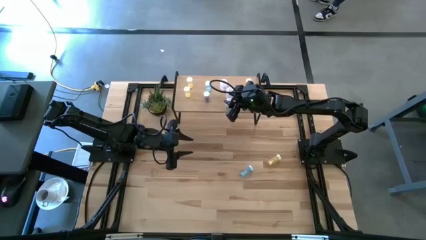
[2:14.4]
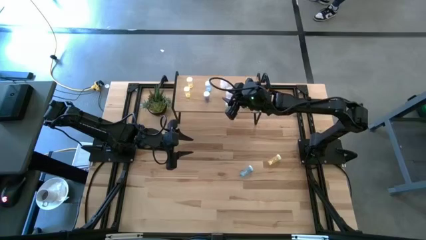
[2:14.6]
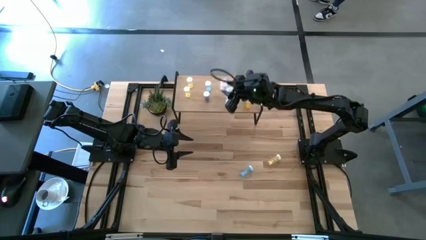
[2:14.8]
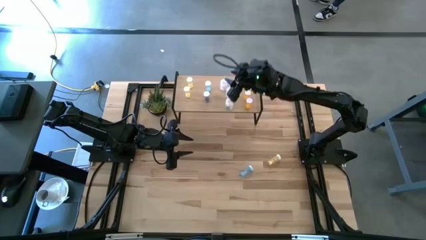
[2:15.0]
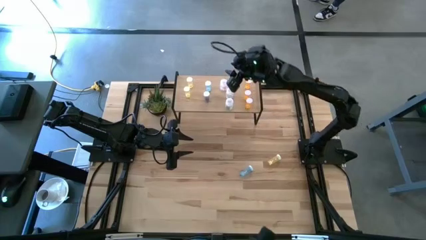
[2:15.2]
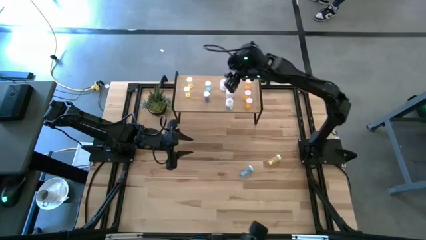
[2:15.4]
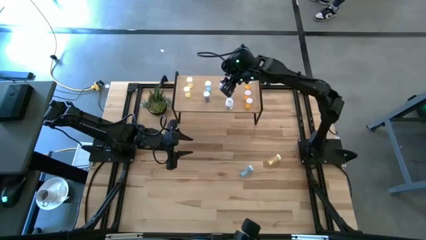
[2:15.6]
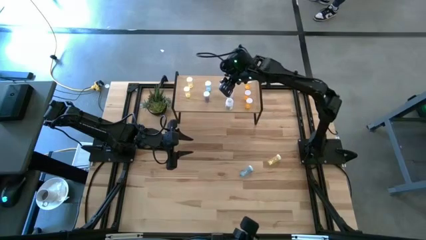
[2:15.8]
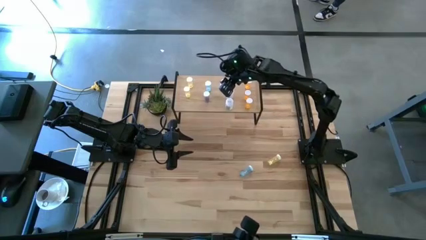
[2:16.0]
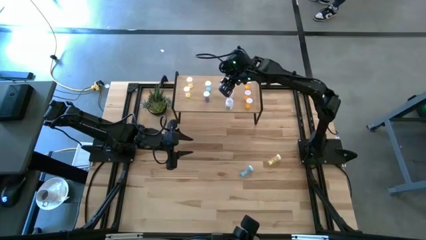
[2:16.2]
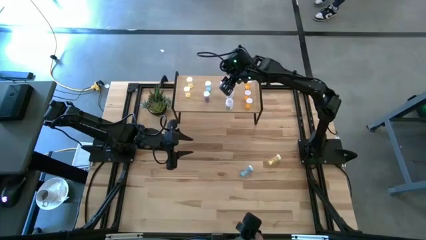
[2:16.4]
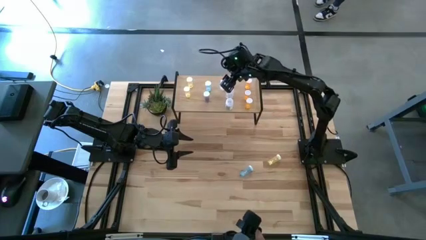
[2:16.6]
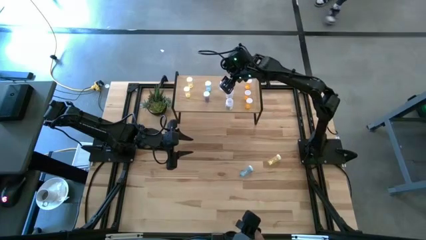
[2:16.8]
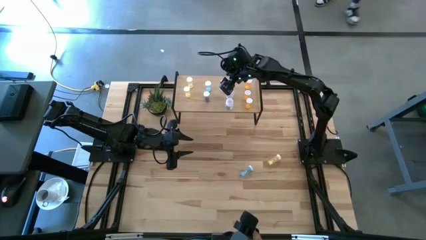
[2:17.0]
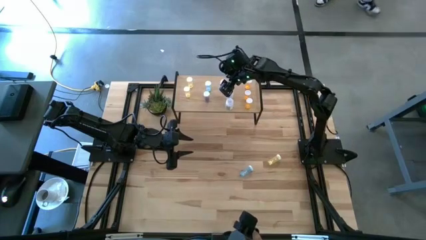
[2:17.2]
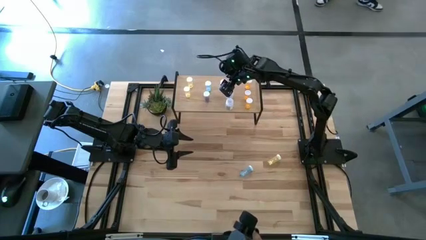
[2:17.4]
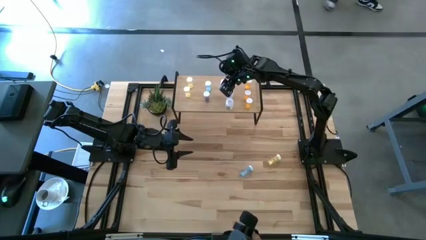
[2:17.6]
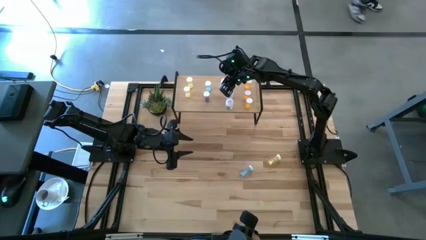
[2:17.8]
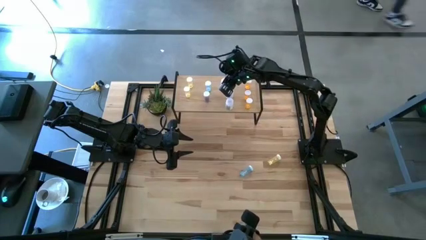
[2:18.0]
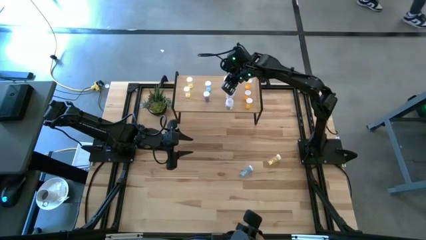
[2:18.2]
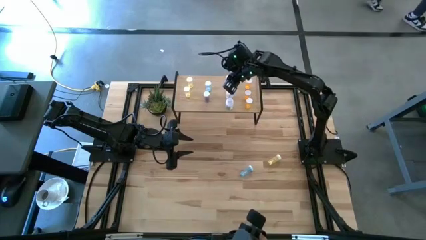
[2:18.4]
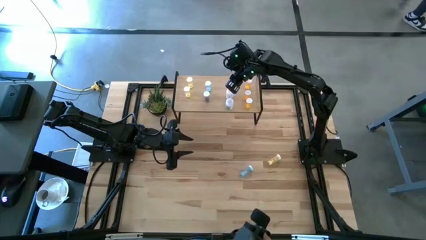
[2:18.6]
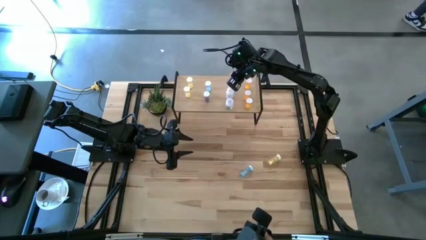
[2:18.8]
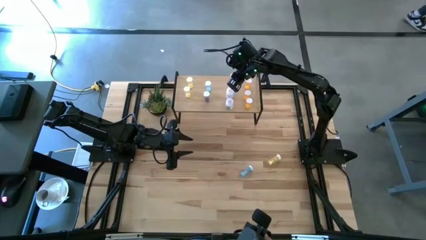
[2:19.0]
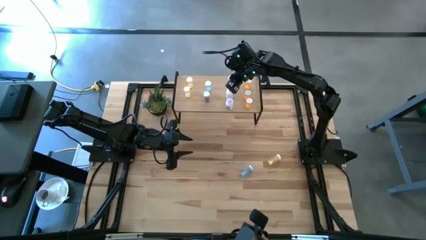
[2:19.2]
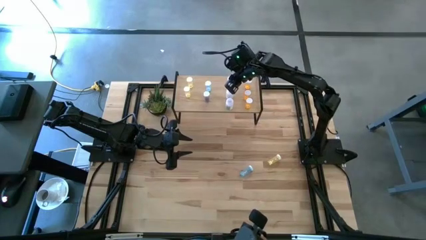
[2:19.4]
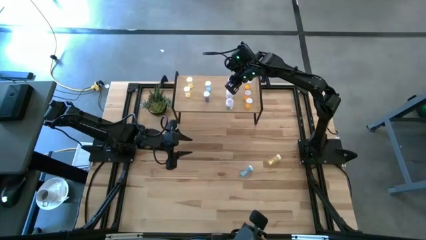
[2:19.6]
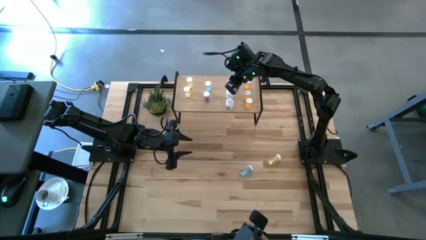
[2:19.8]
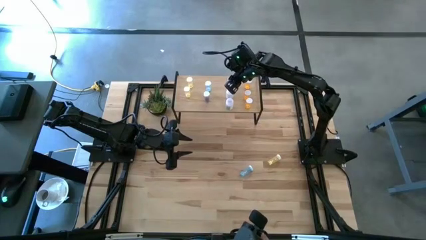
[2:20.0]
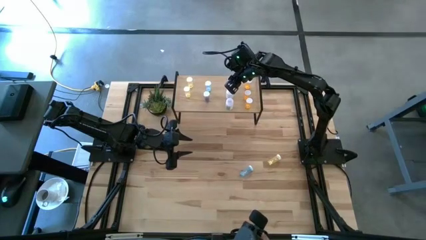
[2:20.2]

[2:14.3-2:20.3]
Task: Pick and place medicine bottles onto shelf by color
Adjust the top transparent pill bottle on the shelf to align with the others

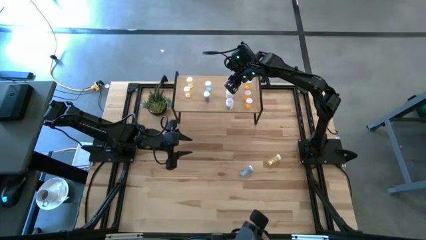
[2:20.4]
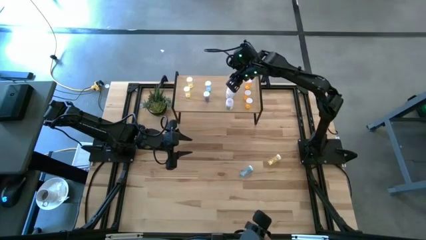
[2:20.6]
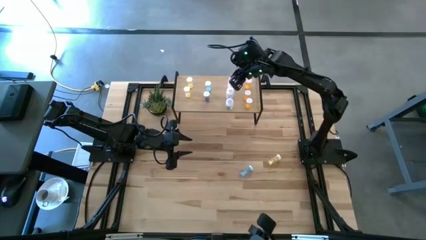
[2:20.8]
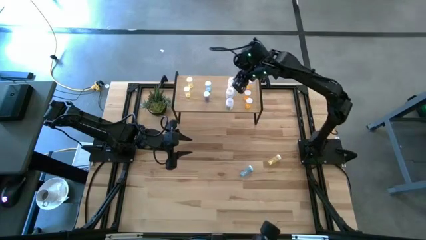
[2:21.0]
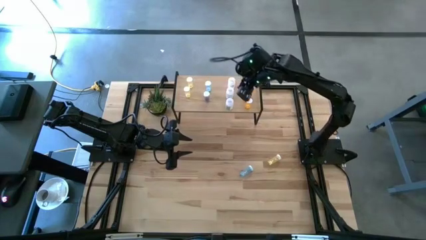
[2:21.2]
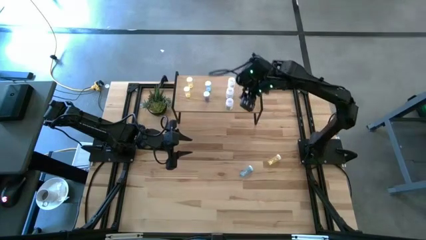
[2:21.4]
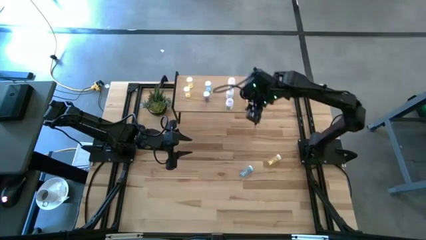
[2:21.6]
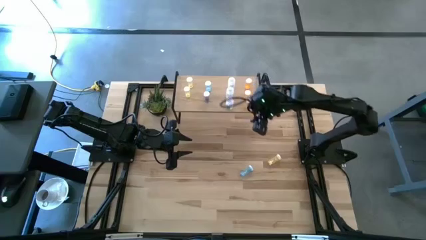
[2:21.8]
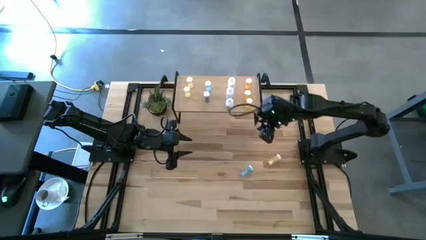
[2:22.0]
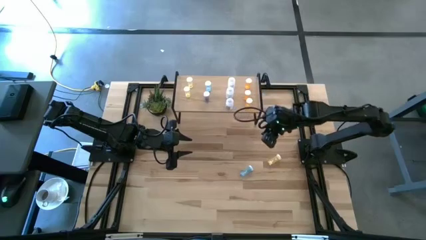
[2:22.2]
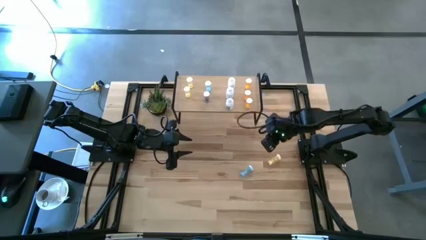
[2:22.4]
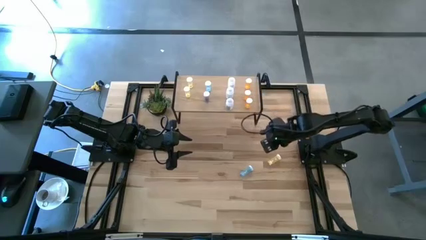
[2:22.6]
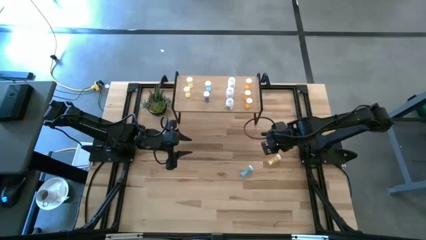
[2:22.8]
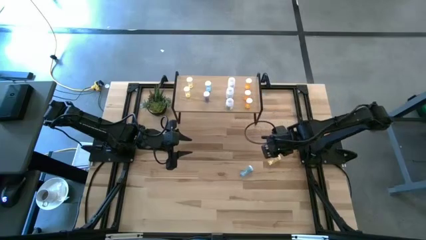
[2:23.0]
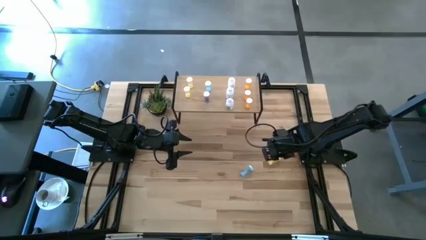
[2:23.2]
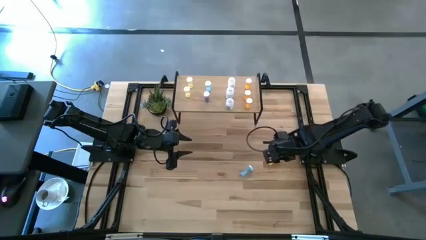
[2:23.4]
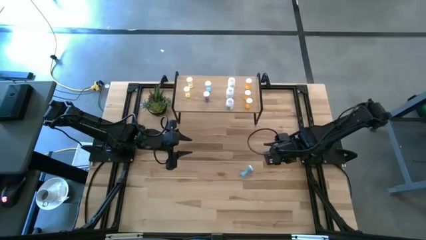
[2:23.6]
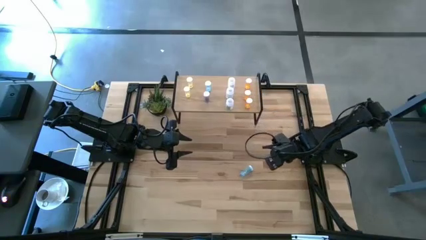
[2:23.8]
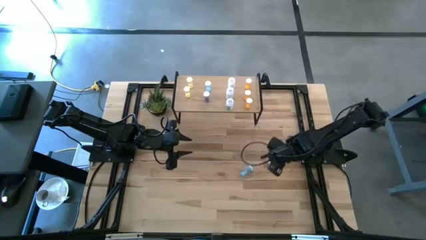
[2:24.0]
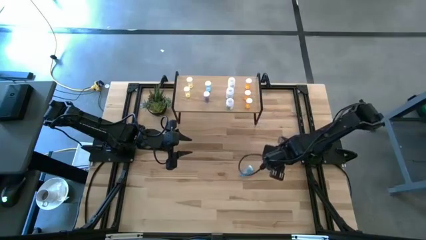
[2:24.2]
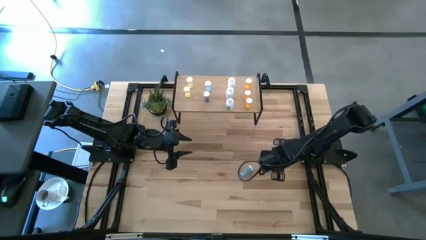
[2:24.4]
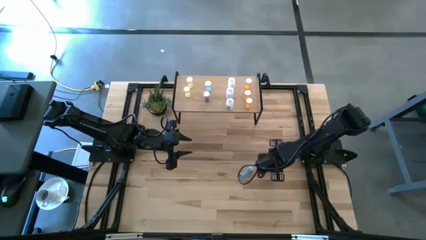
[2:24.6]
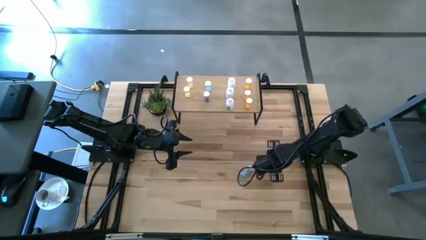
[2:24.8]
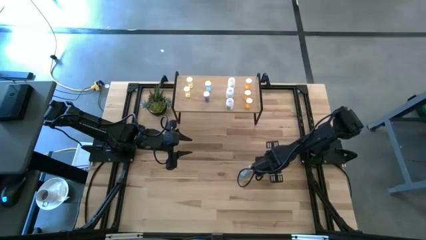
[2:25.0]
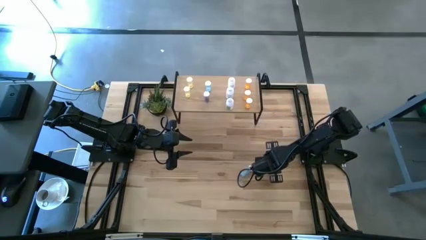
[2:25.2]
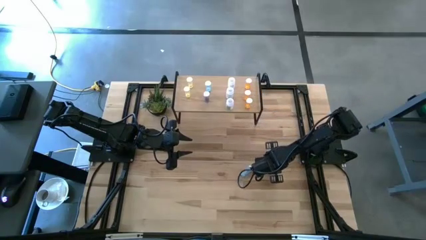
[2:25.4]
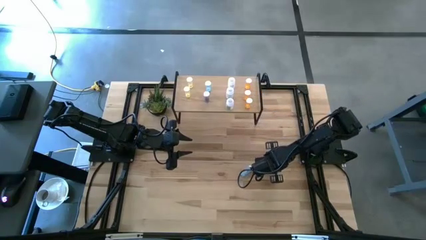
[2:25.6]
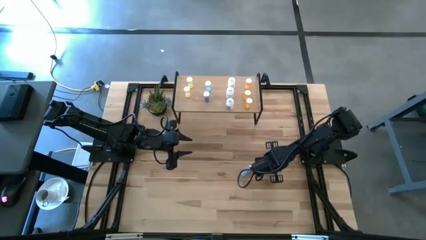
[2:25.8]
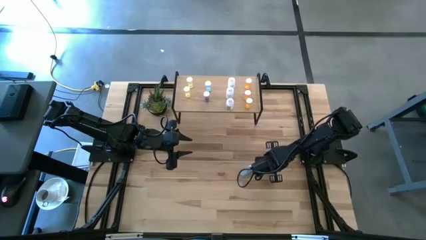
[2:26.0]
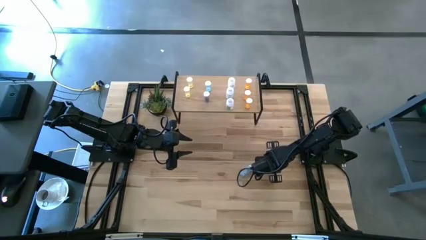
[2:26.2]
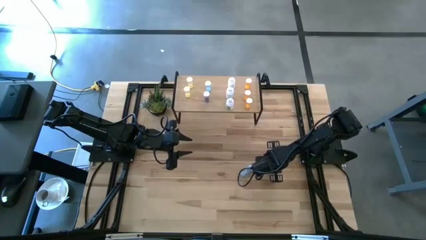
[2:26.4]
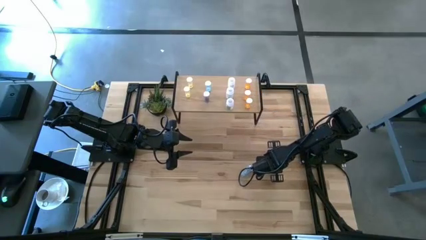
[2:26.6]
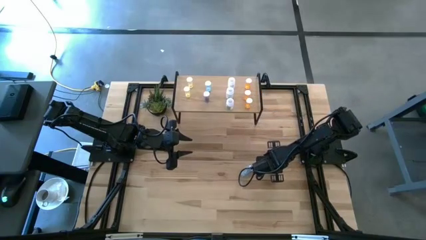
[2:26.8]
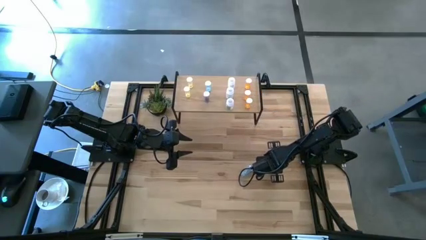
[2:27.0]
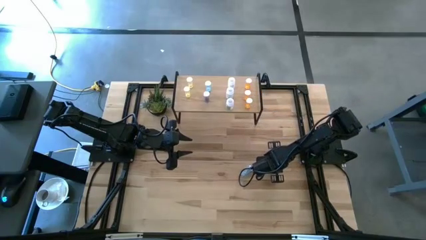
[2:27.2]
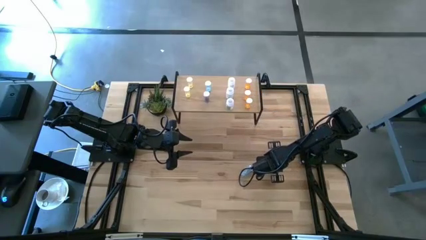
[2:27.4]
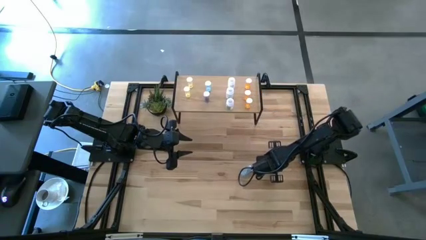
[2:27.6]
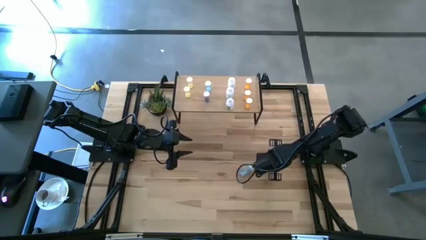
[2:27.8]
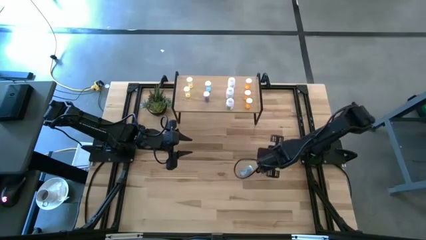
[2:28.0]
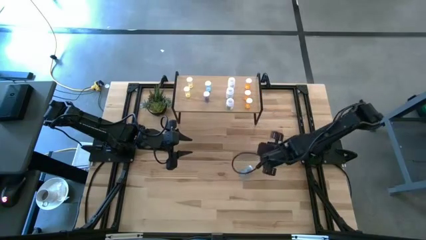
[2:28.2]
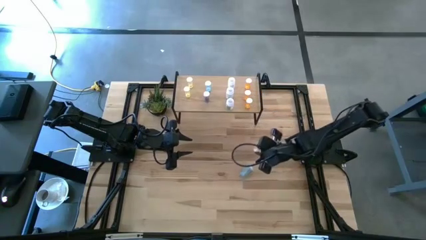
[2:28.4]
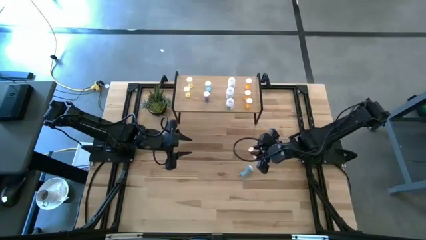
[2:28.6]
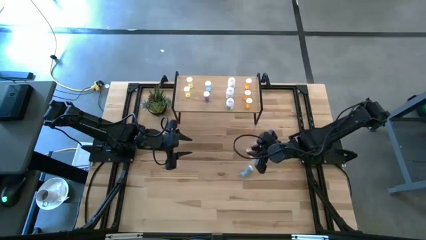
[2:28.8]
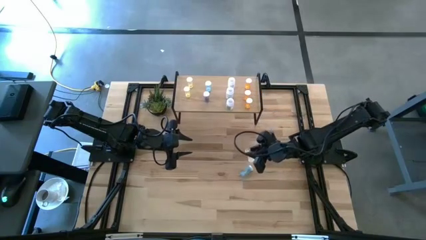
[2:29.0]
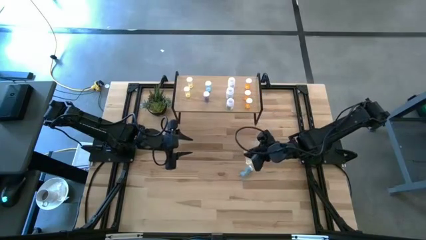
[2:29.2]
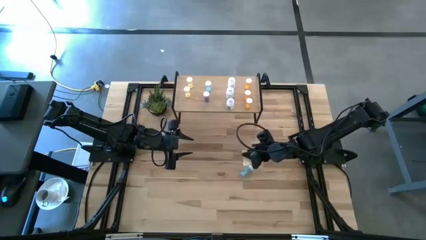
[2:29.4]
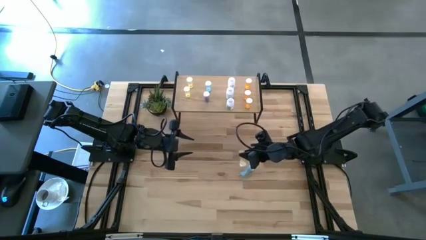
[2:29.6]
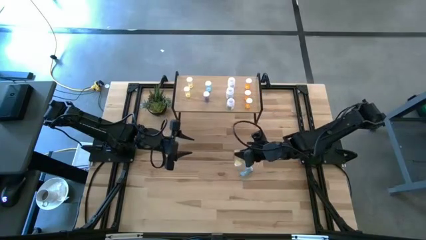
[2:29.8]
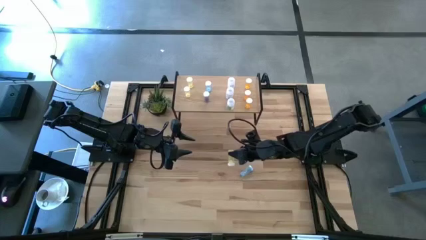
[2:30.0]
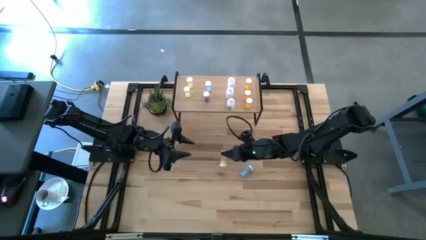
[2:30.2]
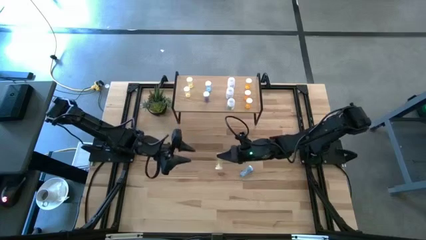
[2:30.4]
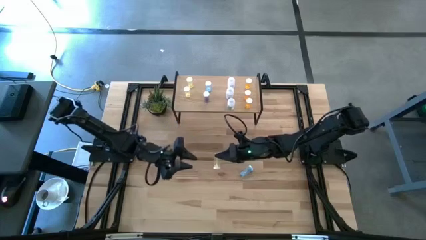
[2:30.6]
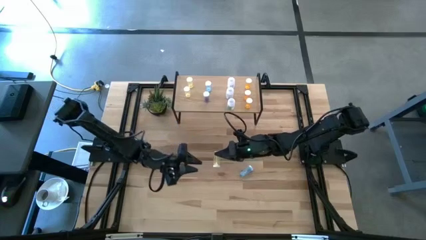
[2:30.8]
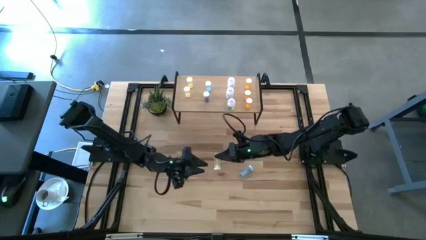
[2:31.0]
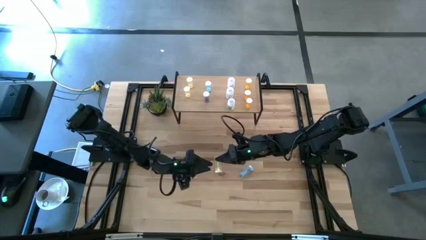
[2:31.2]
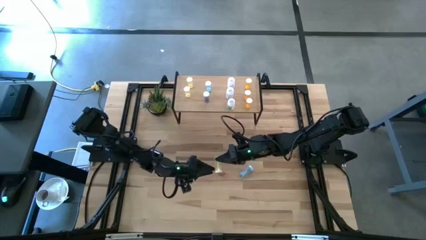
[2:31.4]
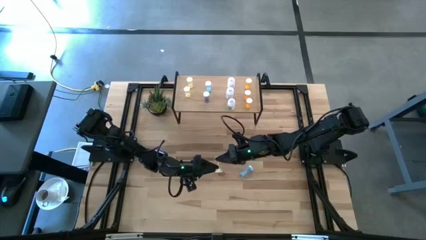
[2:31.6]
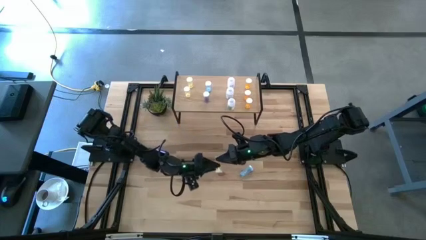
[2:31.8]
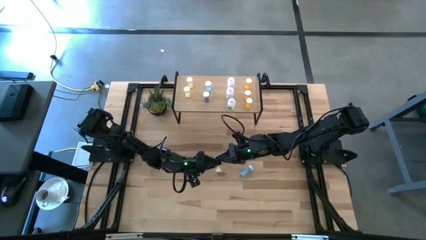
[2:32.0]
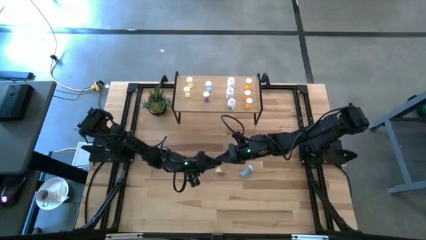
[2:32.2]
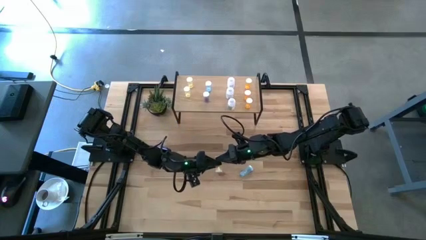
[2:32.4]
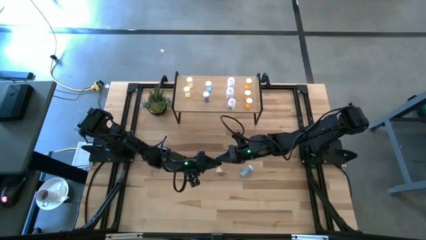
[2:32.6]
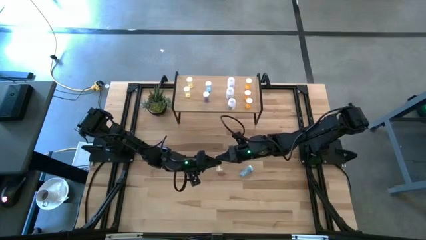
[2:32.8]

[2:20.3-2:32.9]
Put the yellow pill bottle on the shelf
